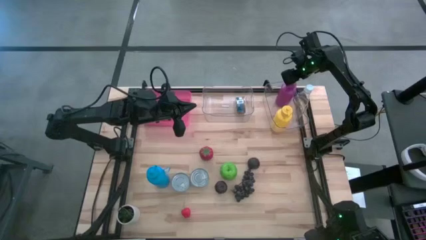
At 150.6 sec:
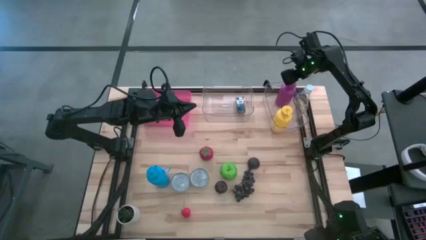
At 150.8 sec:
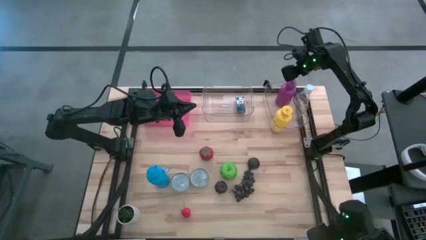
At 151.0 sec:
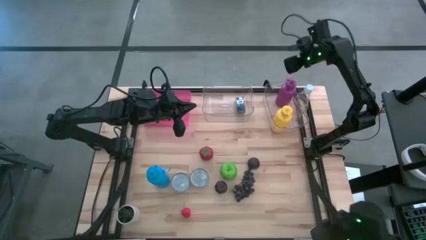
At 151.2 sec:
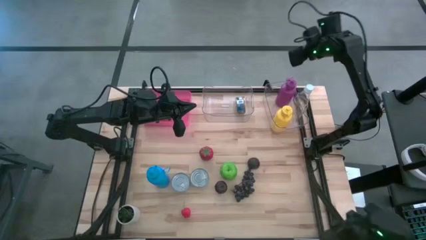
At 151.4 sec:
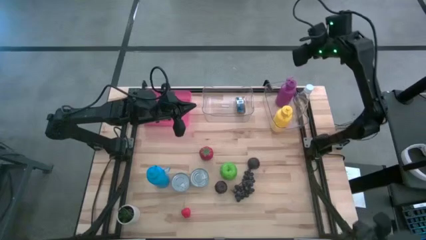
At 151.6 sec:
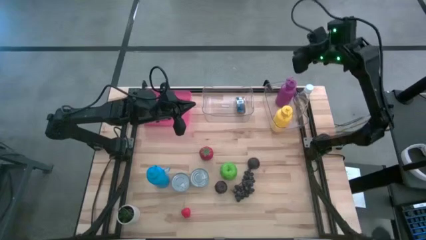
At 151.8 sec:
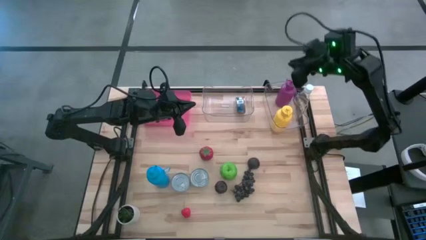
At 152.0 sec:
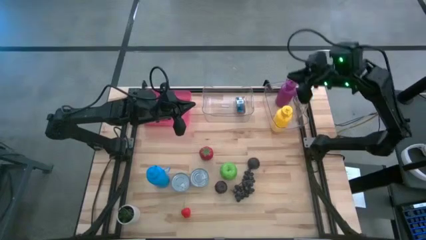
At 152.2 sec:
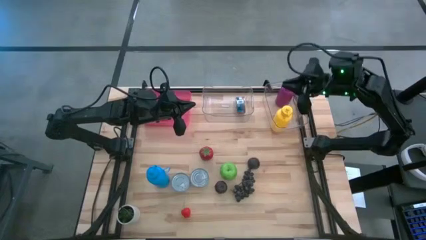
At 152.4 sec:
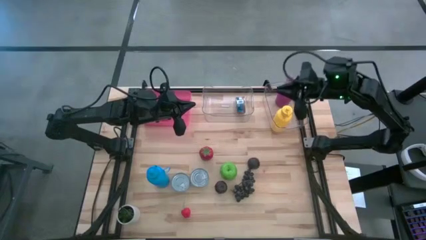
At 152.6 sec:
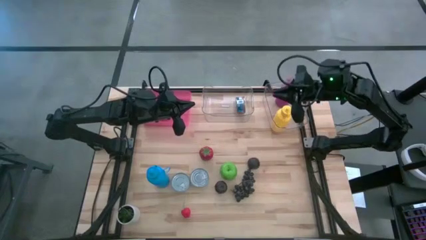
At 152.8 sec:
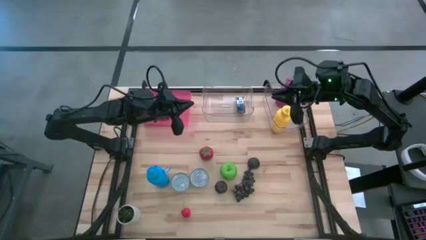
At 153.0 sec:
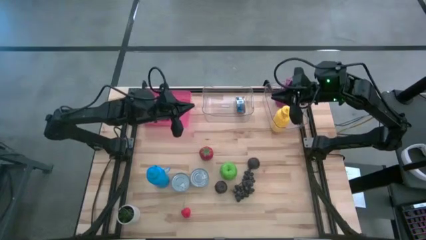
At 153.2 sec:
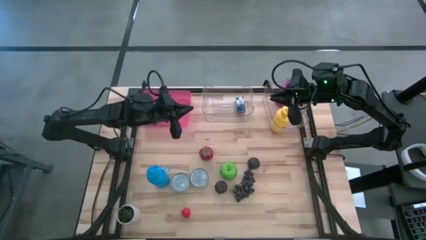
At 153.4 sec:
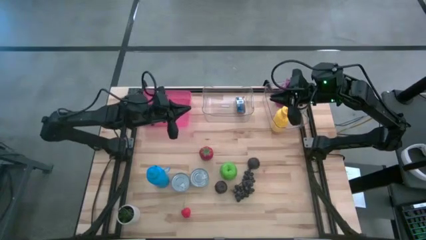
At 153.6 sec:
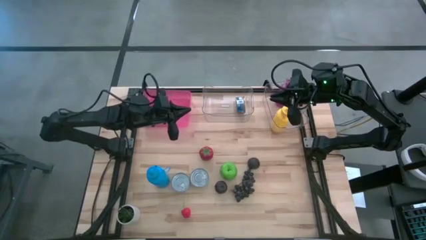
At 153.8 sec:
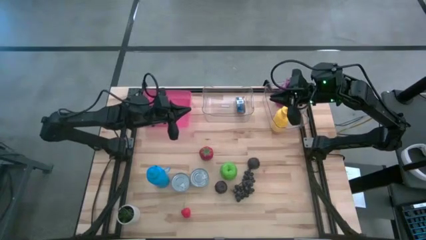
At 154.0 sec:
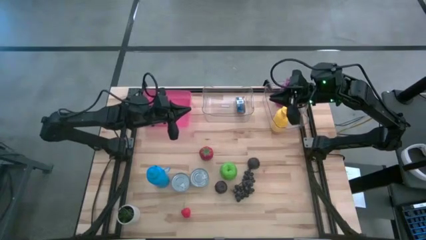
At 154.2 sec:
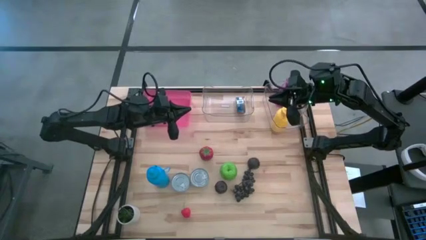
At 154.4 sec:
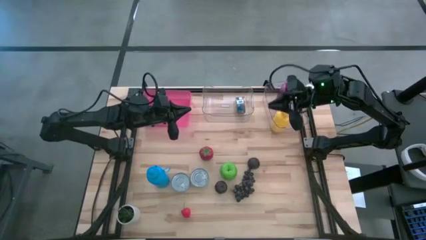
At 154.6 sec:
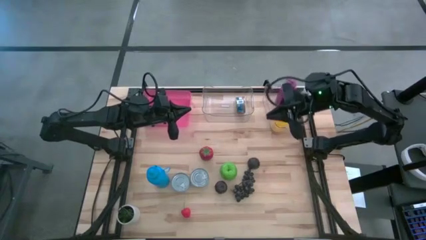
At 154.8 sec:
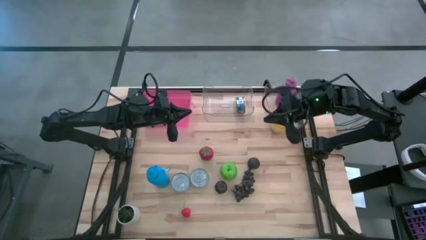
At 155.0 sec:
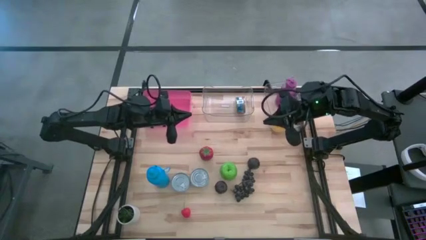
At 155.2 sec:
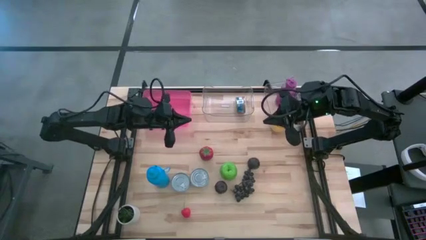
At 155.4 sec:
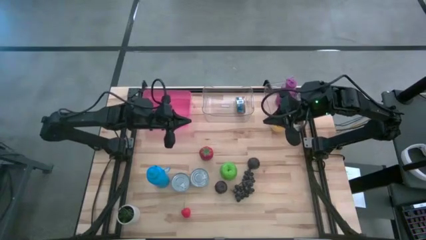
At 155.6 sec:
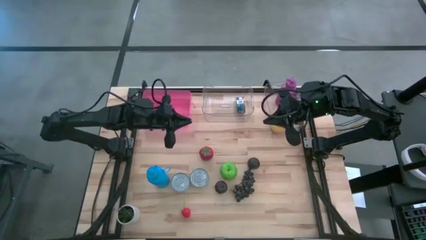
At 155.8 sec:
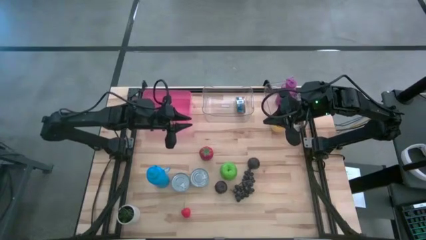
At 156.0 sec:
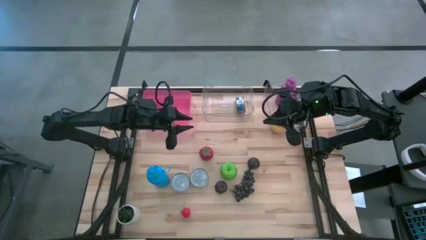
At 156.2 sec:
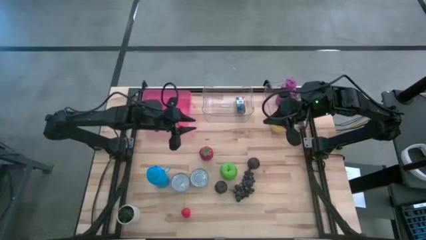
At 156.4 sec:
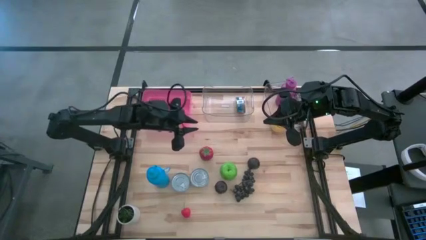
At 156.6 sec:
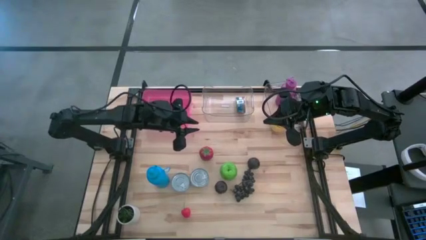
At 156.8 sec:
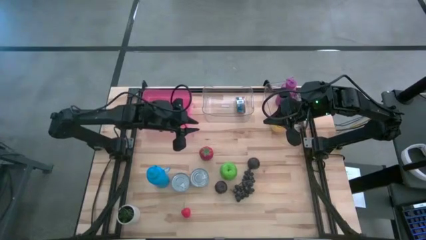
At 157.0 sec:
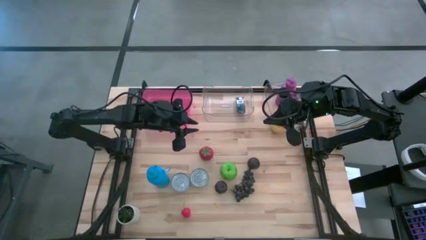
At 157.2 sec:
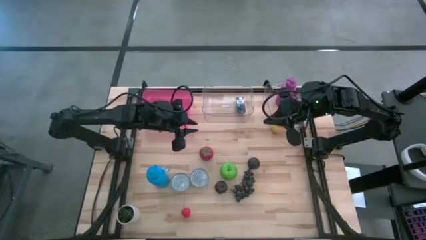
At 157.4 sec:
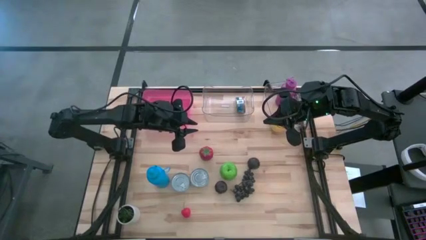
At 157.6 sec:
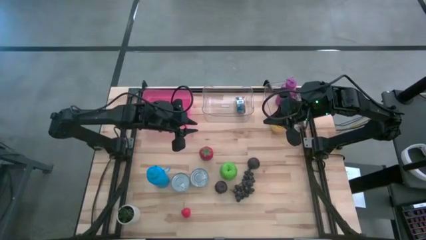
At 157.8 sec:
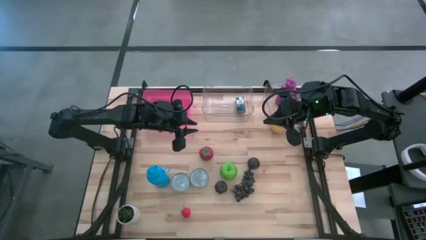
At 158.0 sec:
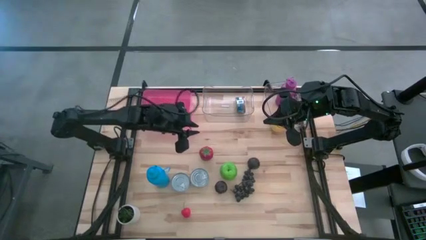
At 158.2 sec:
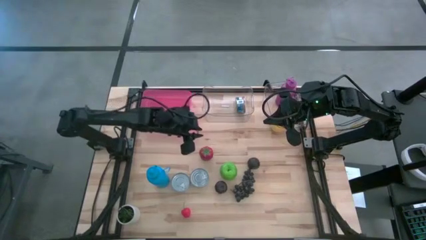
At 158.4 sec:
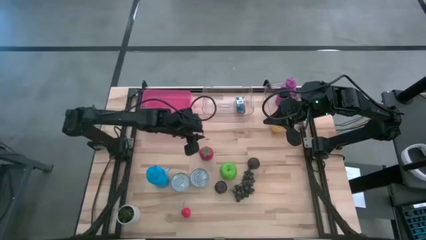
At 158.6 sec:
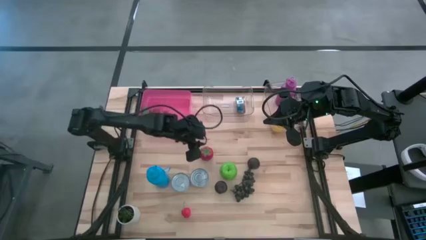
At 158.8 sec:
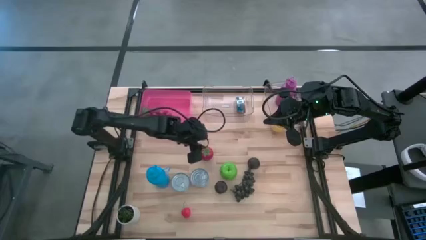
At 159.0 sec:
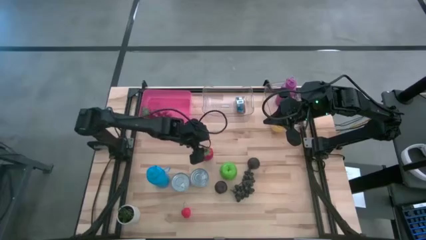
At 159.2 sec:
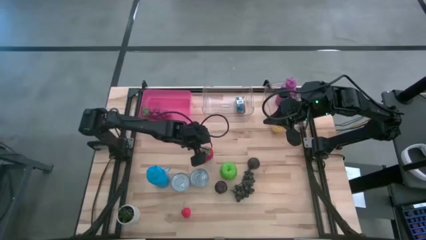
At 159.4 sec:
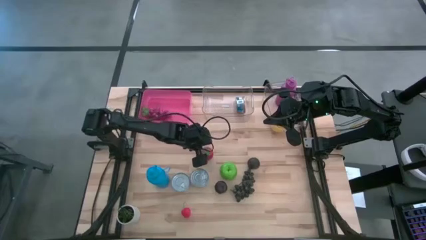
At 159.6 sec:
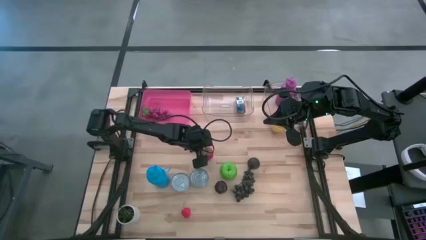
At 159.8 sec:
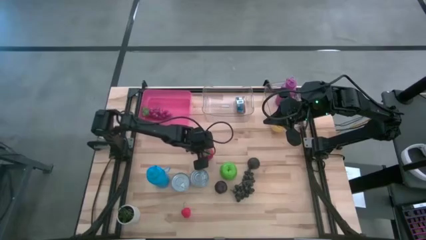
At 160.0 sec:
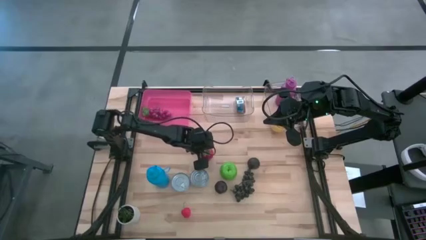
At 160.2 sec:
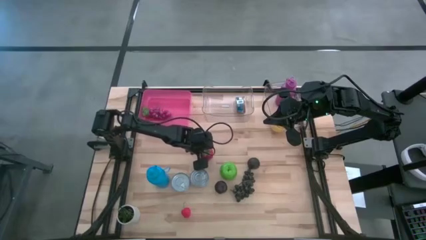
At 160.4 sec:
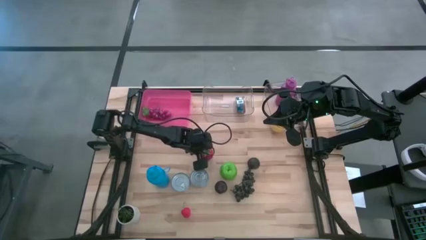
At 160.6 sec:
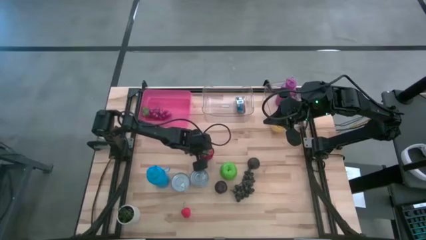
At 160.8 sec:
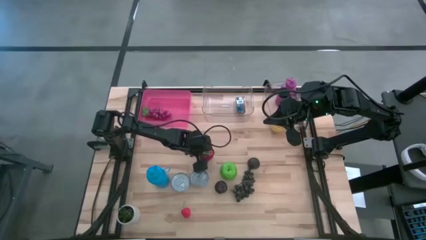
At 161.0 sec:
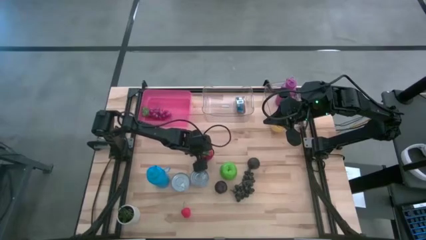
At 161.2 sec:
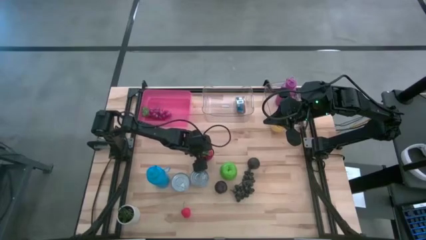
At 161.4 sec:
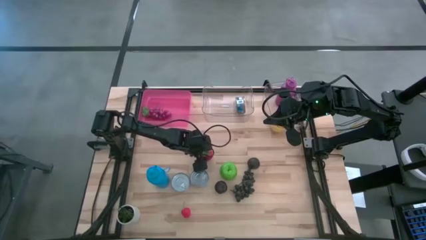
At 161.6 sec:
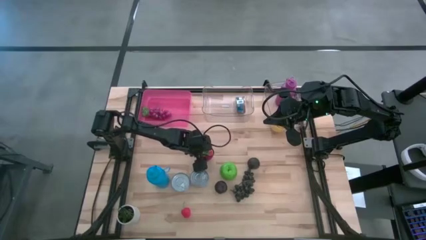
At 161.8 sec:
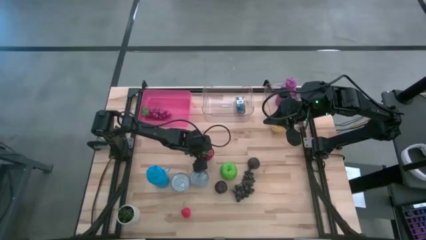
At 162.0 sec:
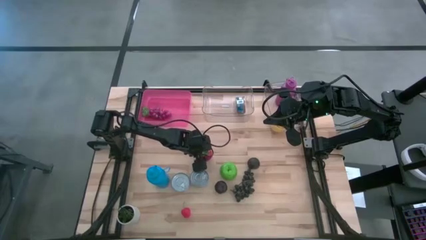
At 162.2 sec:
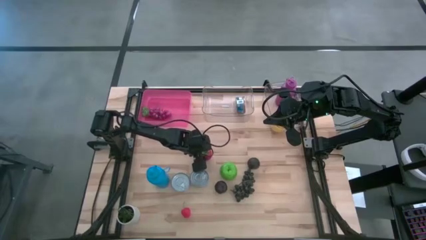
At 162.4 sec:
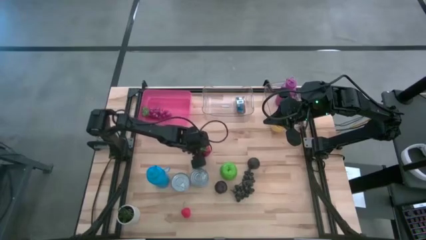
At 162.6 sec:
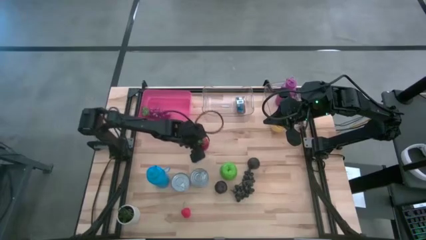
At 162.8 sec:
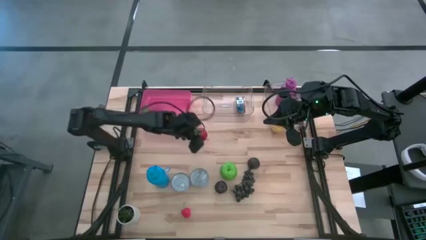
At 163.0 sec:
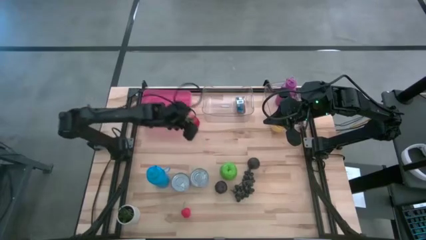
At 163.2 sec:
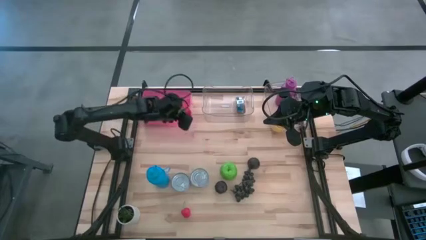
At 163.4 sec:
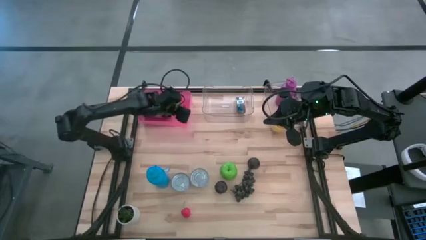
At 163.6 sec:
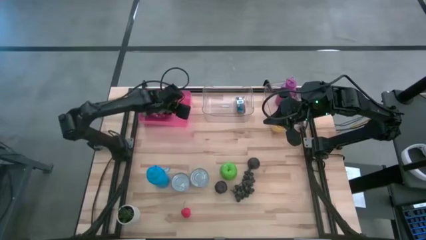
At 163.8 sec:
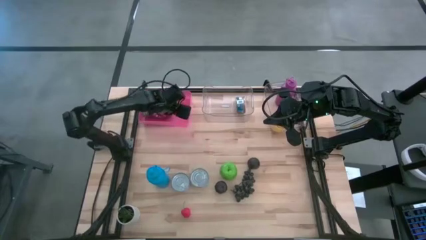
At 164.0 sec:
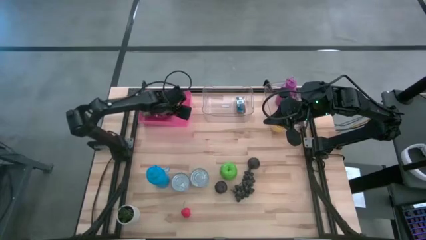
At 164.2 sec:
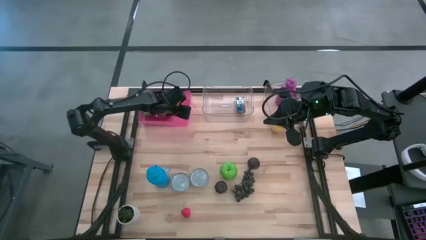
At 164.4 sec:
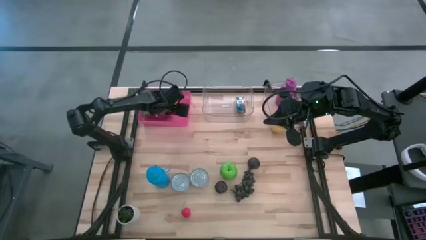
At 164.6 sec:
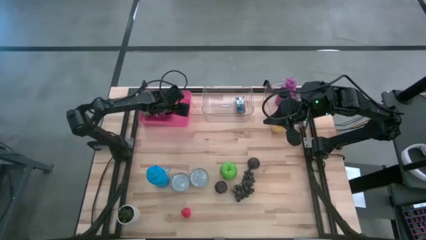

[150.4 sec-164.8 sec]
Task: Pick & Place Food Item
Put the red tomato into the red transparent bin
